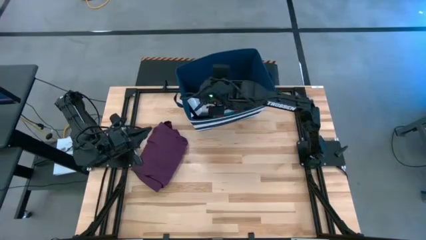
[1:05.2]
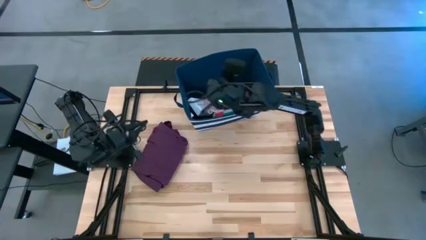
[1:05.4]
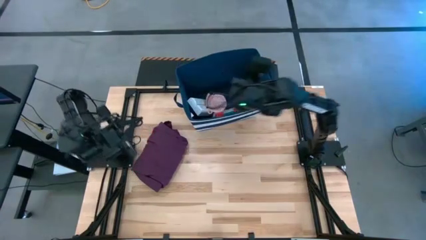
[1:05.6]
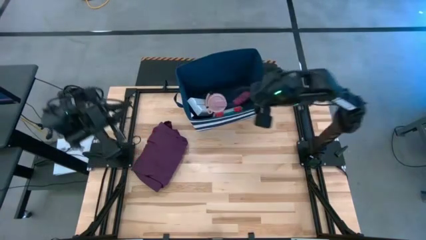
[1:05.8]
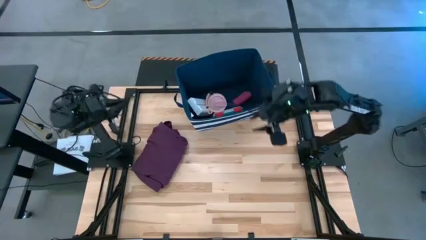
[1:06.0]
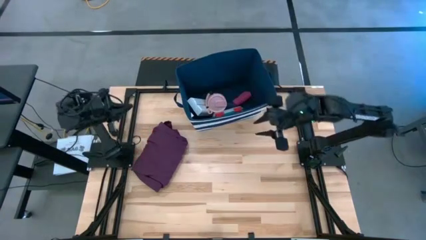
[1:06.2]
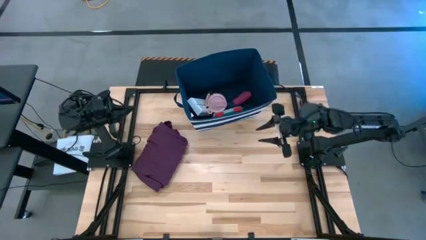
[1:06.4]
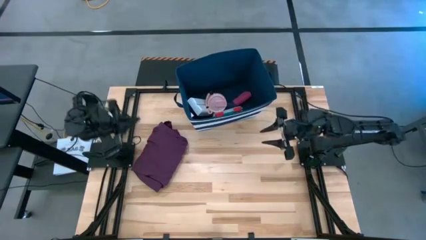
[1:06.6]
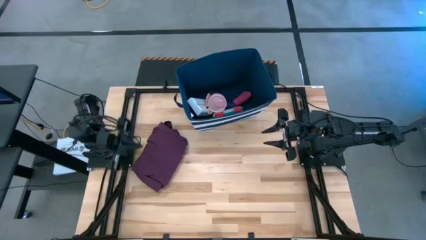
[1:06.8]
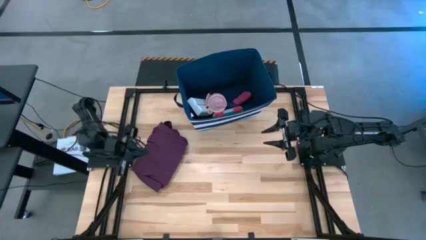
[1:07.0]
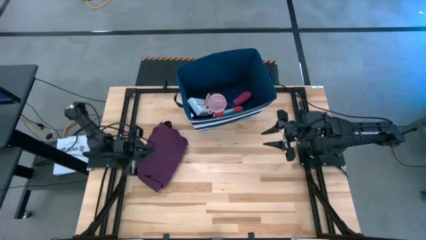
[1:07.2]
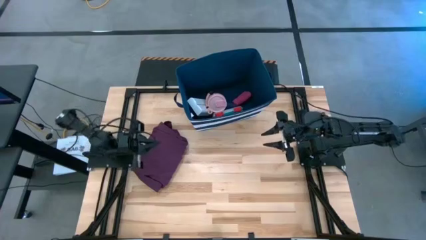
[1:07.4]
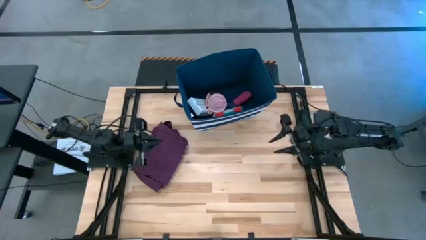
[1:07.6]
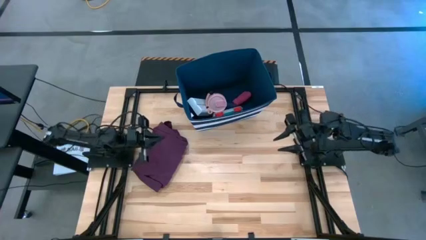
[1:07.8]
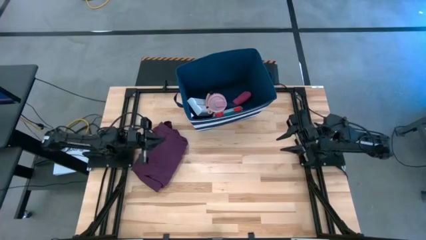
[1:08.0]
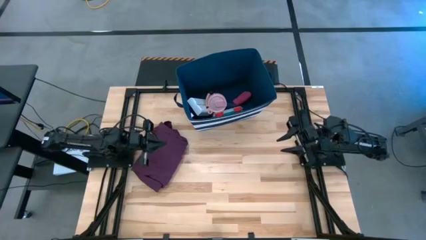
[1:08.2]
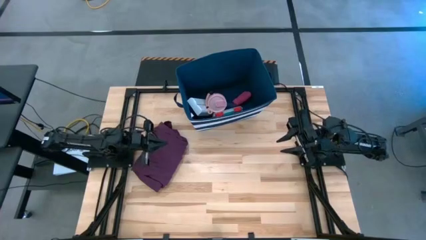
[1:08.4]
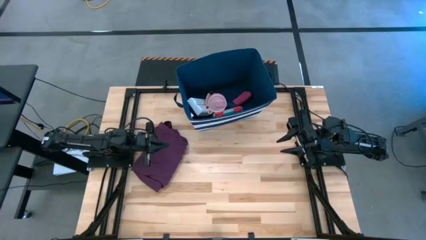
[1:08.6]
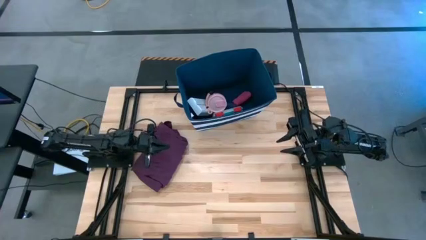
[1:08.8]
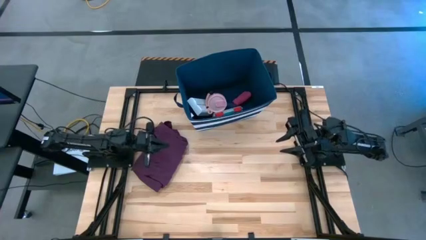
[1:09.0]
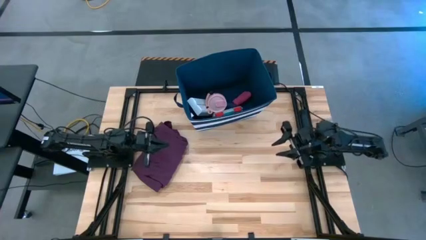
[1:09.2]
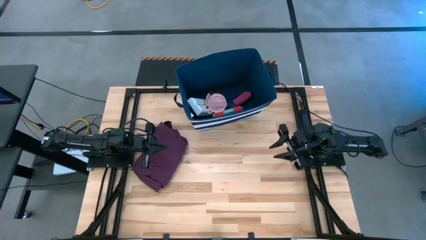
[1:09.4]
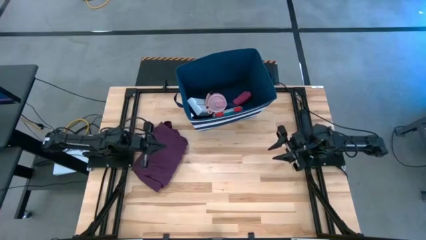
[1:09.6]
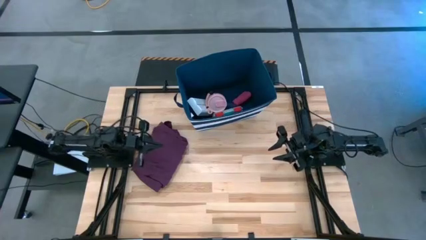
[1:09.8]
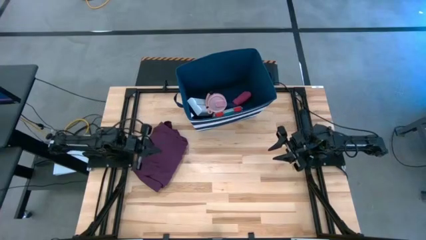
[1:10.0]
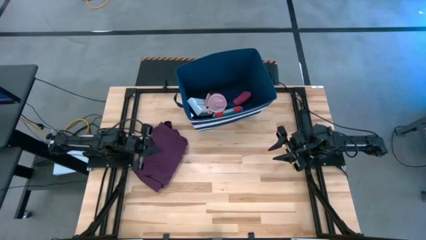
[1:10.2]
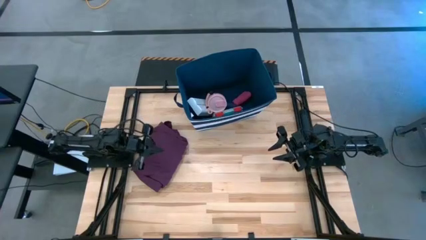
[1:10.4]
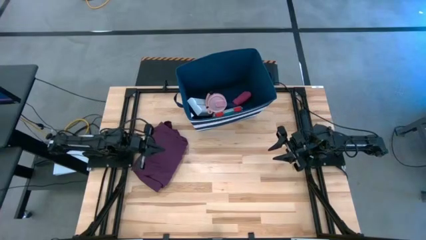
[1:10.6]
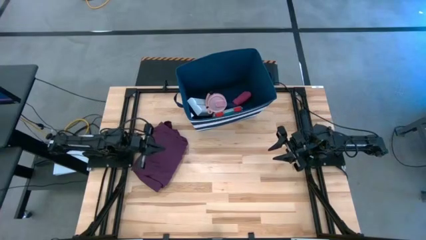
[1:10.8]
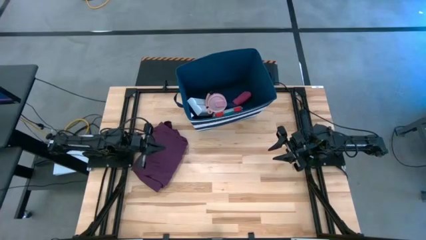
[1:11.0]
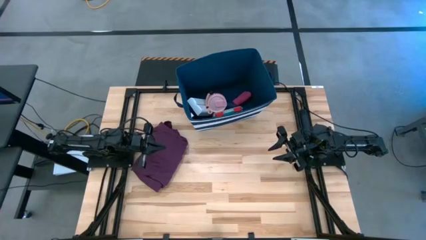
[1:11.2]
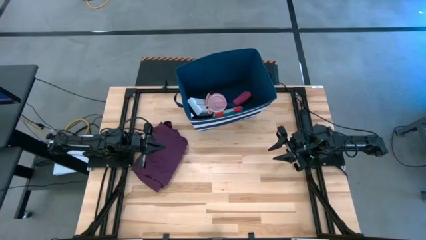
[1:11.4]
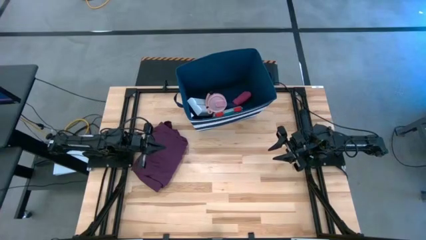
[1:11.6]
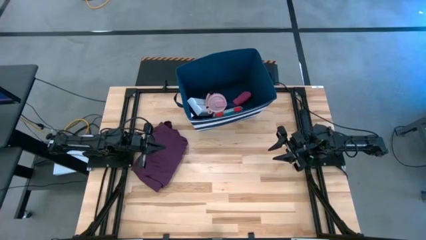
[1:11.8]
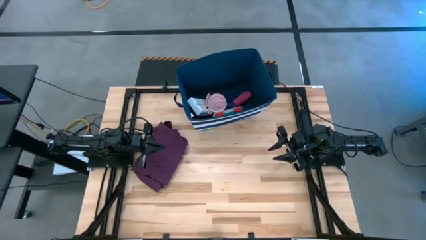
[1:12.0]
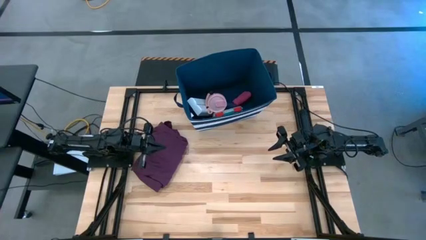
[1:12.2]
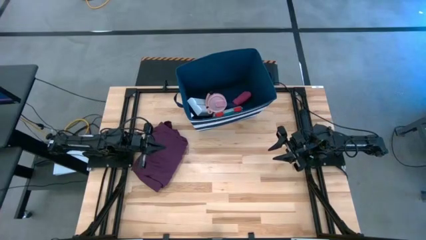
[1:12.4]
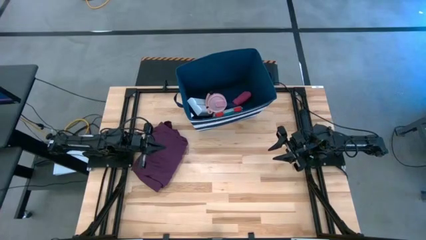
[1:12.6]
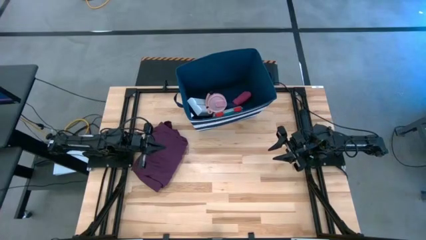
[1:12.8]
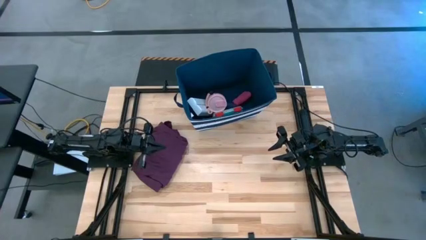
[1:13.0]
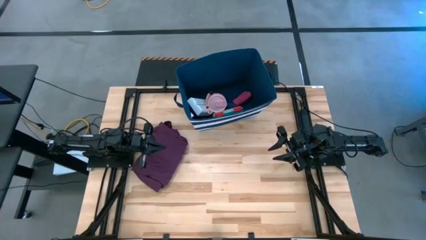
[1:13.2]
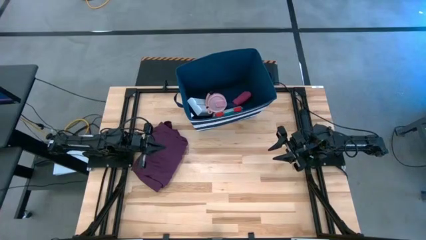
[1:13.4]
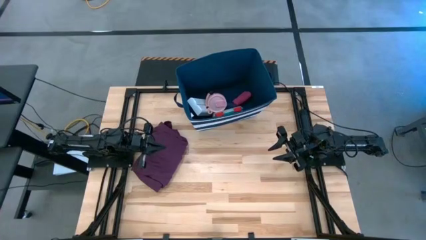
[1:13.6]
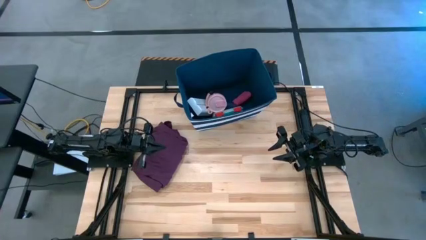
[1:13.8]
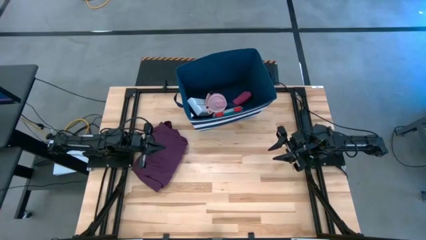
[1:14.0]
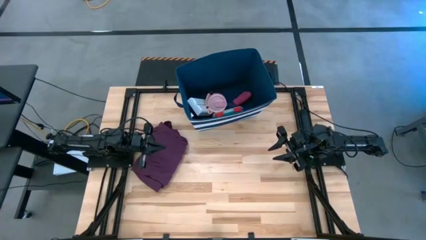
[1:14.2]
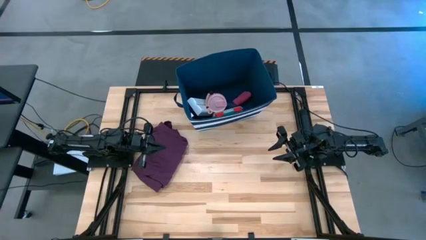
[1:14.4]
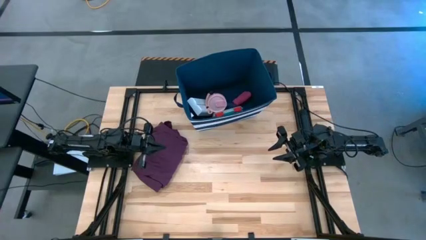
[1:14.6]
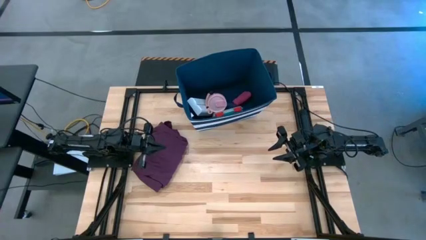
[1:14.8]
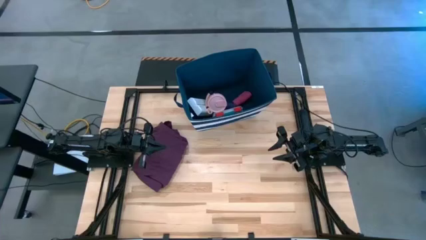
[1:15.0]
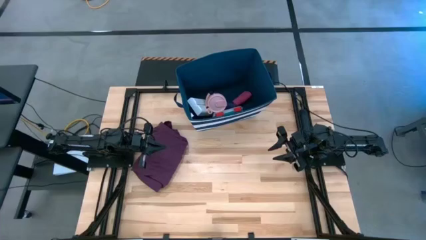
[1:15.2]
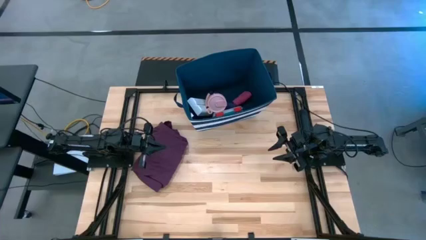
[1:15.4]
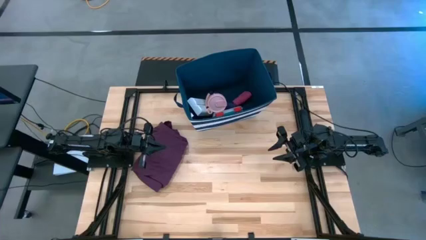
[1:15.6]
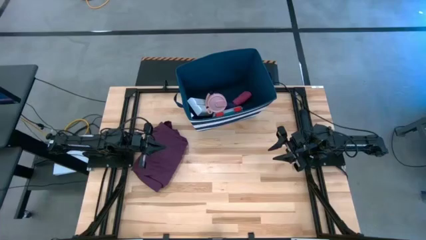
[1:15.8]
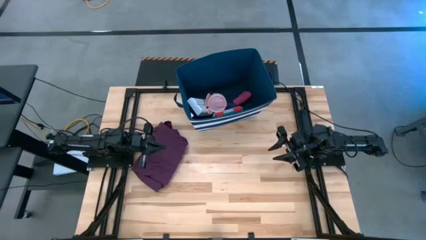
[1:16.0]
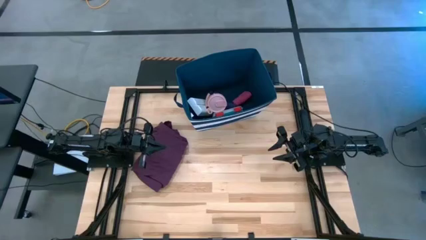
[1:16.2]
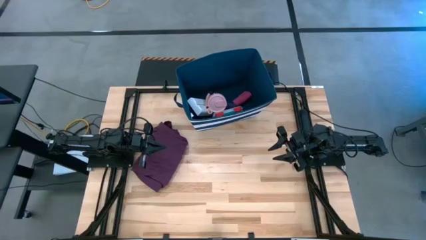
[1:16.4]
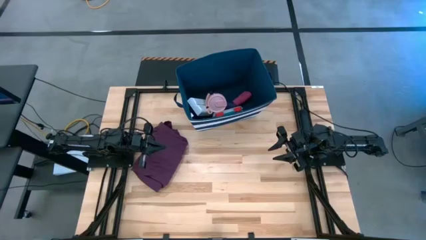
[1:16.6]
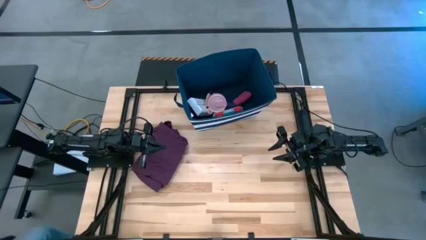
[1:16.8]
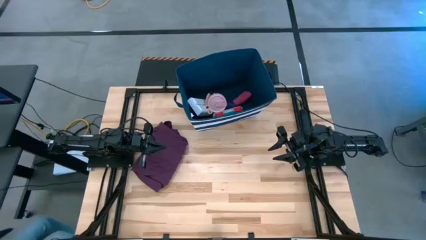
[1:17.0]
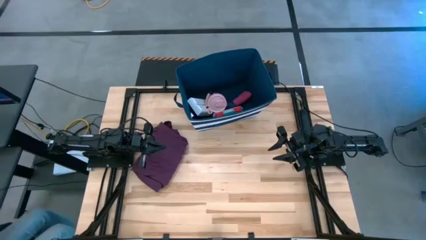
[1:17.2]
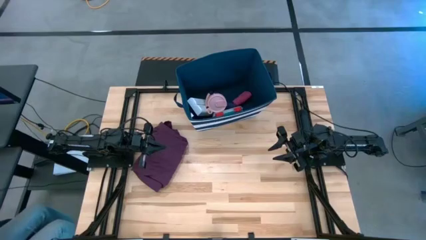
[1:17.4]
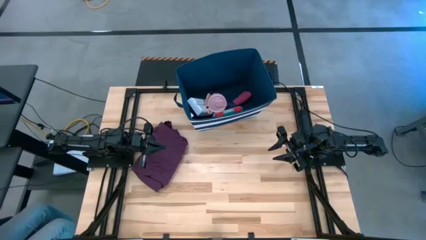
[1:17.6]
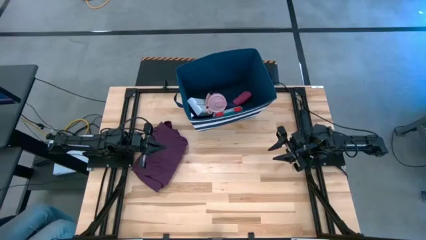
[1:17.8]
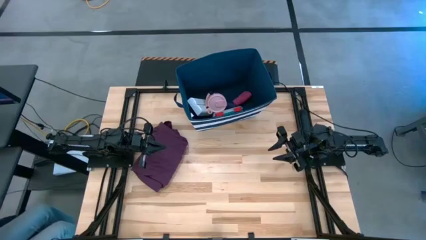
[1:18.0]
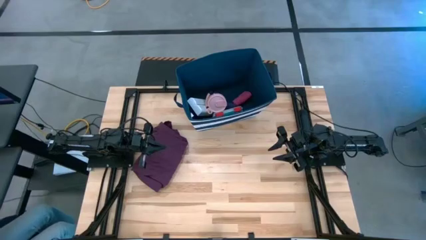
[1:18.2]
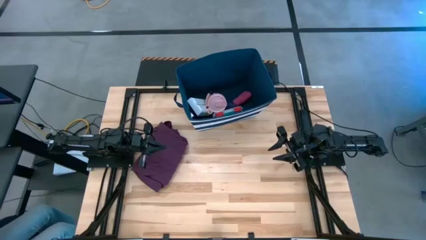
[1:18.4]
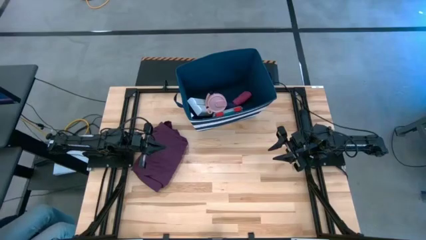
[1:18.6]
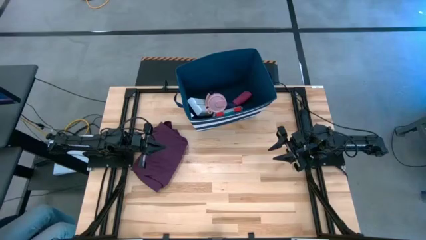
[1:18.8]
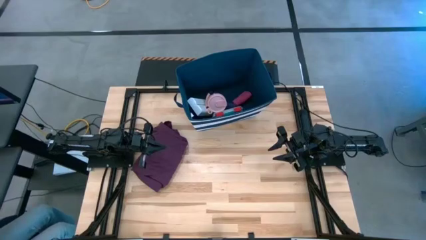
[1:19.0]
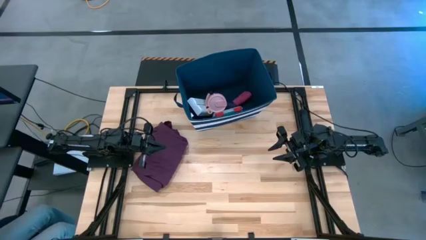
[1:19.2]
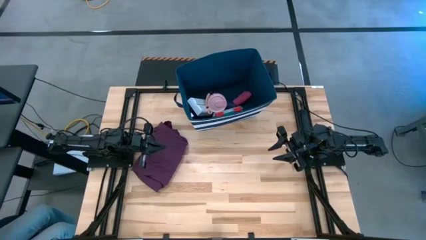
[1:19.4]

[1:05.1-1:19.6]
Task: Pick & place medical supplies in basket/bin
Return to Home Position

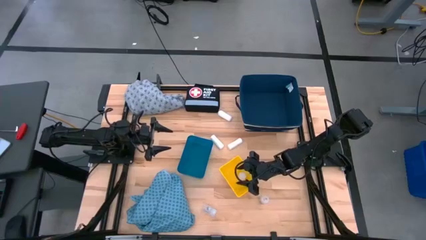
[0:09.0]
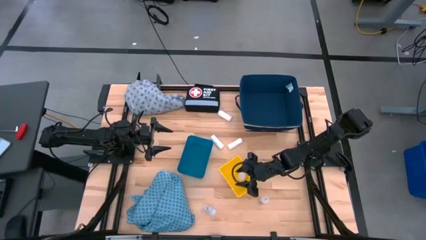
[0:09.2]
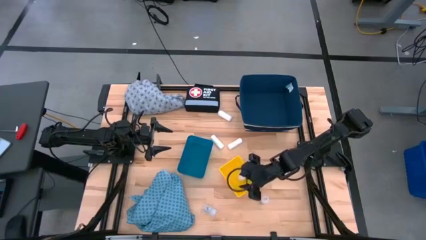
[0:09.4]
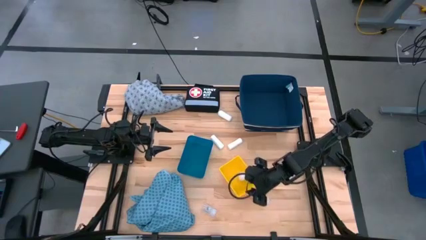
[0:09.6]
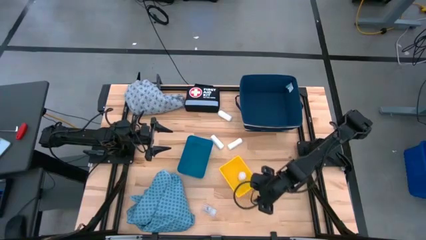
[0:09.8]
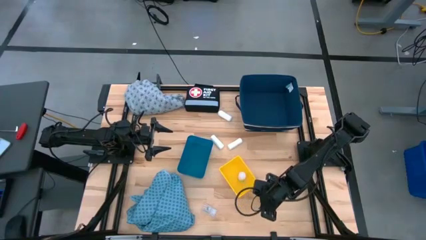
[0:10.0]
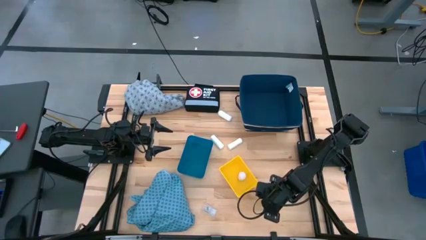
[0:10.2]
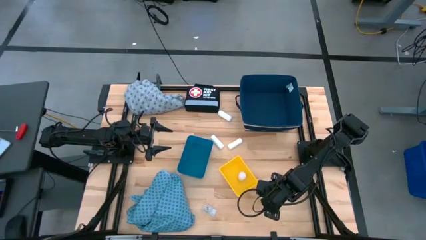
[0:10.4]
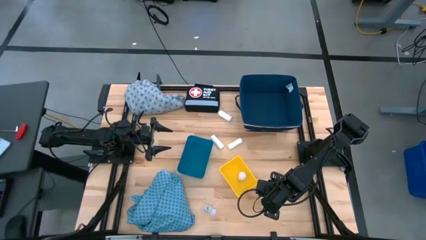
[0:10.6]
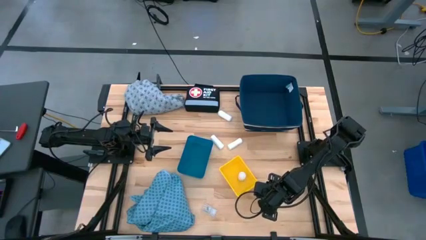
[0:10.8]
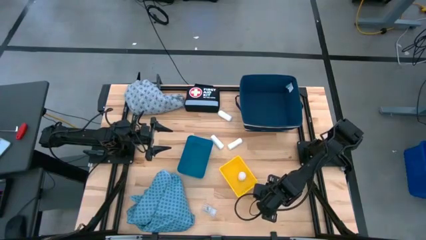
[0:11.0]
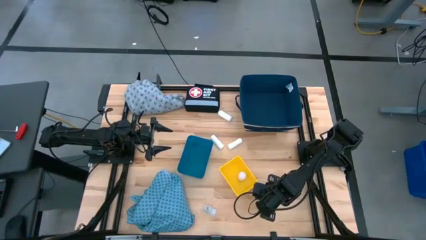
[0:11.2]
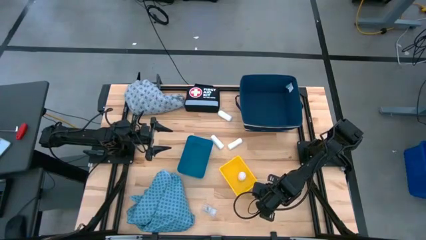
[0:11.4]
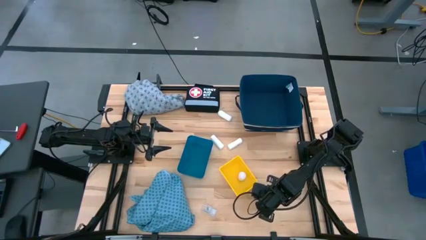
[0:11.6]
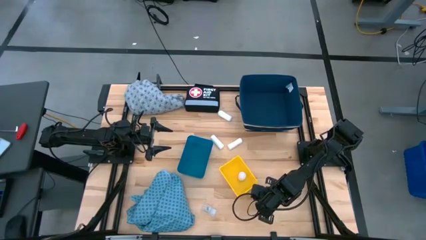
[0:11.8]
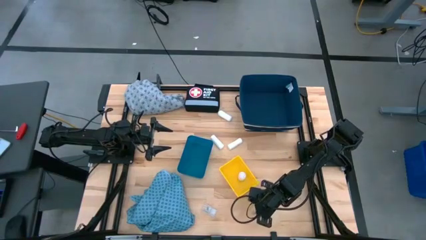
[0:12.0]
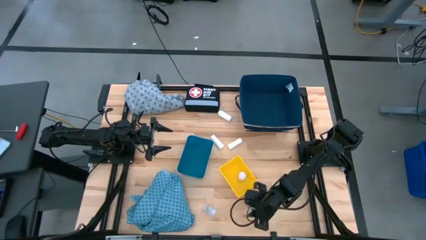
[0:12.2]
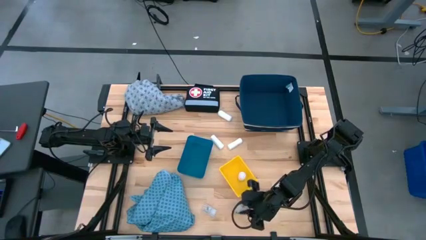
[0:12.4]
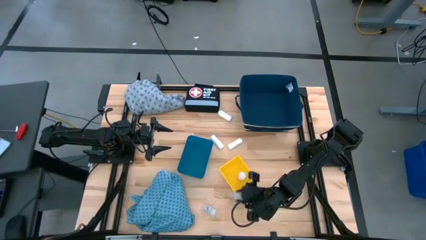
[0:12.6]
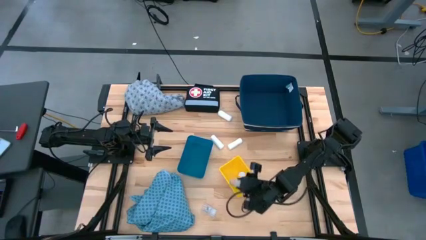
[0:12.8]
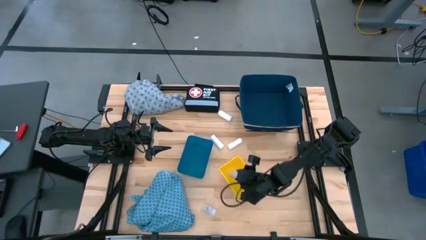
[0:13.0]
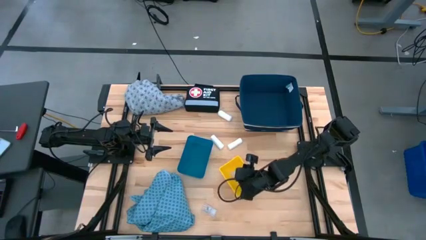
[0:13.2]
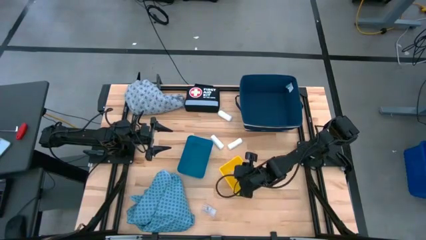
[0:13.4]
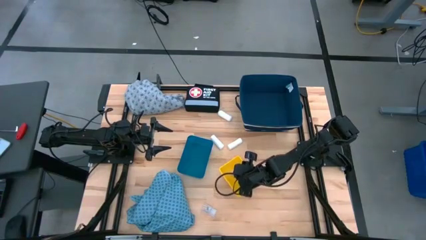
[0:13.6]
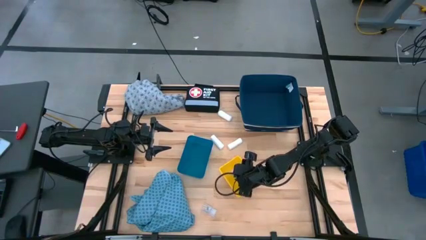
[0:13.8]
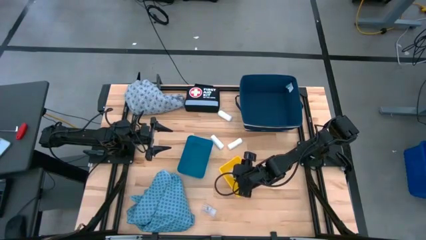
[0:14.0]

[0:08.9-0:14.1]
Task: Pick & place medical supplies in basket/bin
Put the right white pill bottle into the yellow bin
